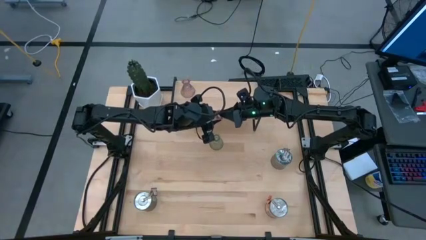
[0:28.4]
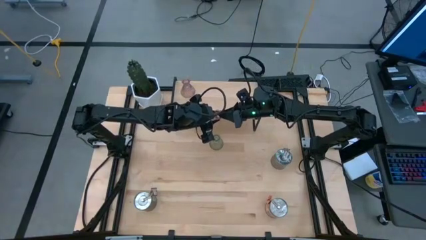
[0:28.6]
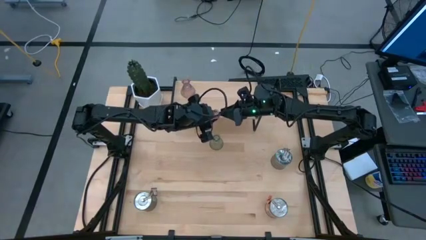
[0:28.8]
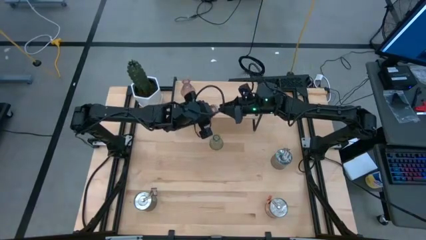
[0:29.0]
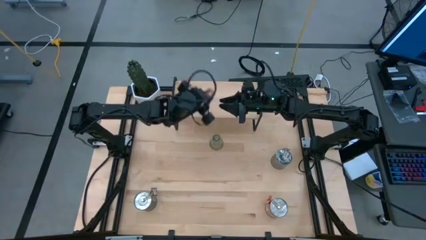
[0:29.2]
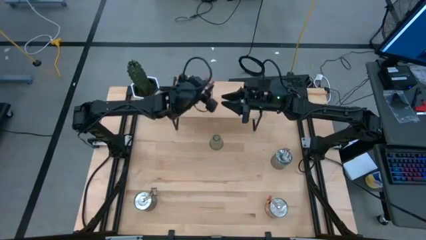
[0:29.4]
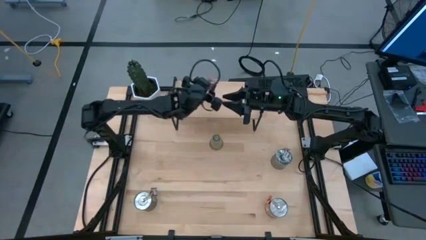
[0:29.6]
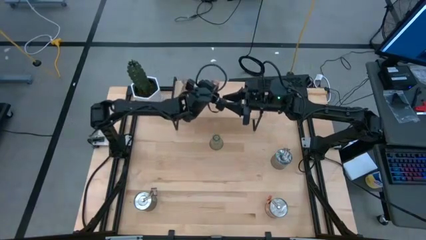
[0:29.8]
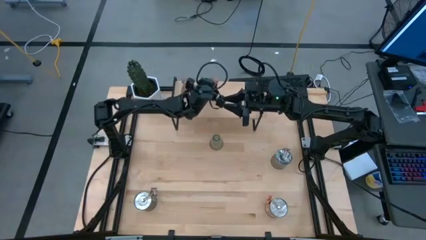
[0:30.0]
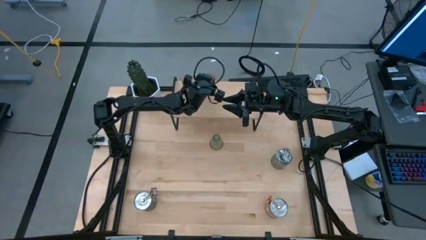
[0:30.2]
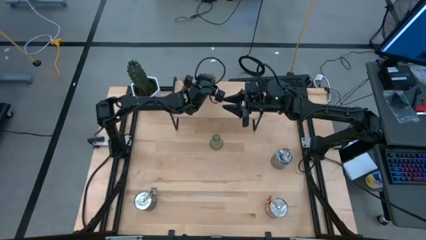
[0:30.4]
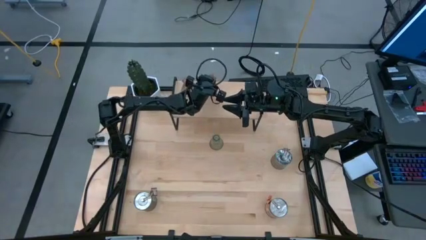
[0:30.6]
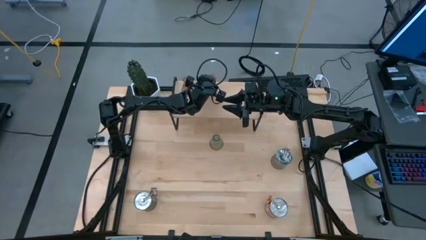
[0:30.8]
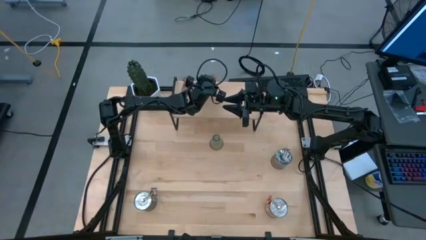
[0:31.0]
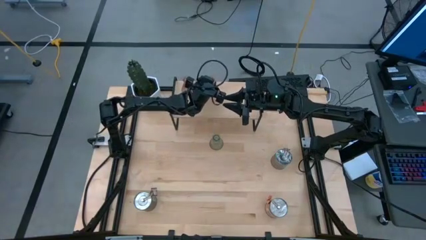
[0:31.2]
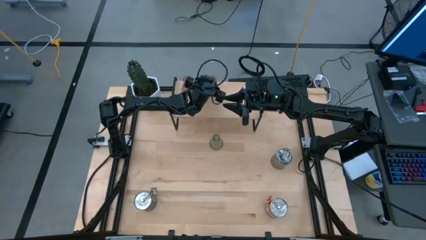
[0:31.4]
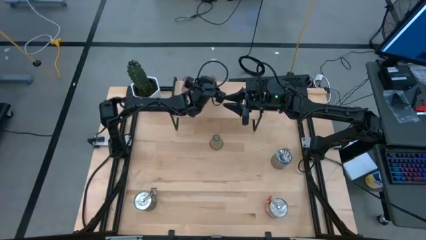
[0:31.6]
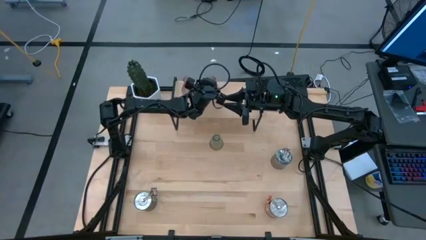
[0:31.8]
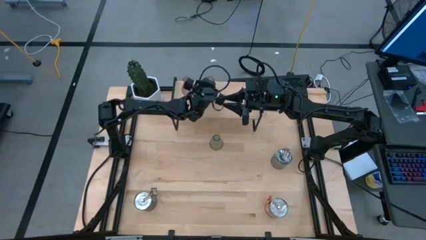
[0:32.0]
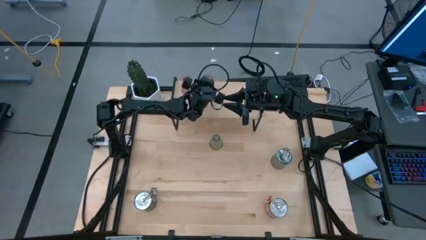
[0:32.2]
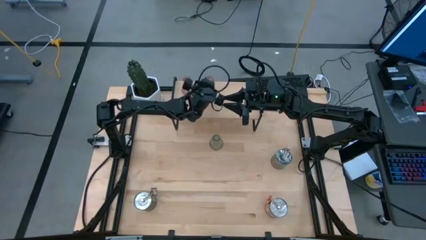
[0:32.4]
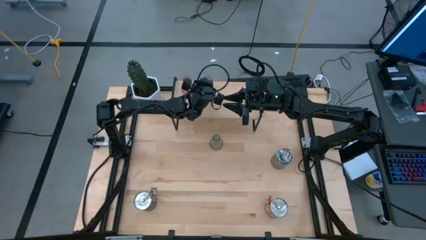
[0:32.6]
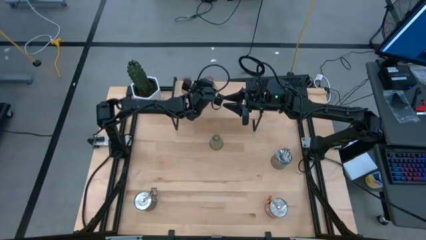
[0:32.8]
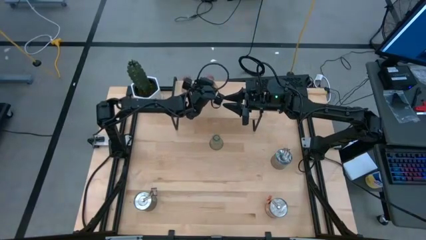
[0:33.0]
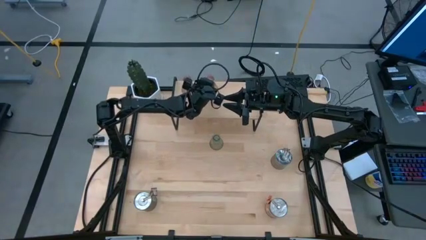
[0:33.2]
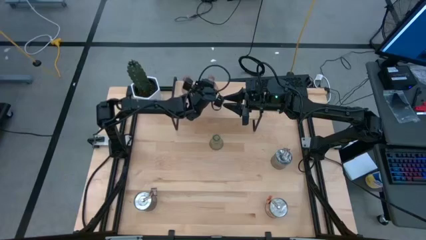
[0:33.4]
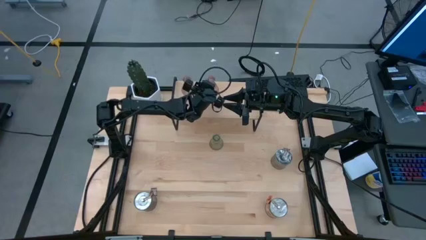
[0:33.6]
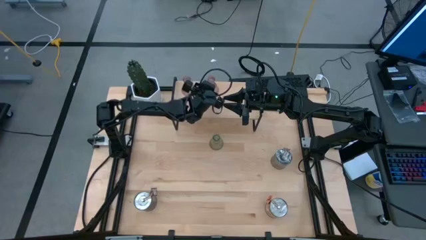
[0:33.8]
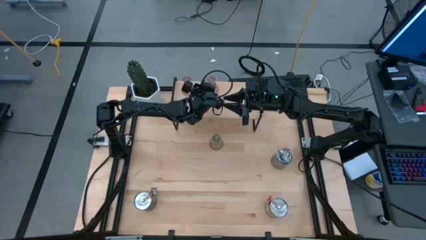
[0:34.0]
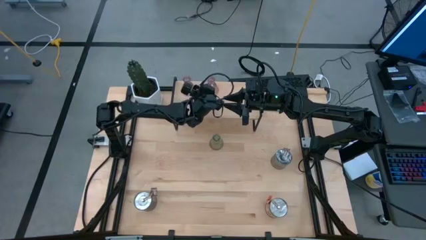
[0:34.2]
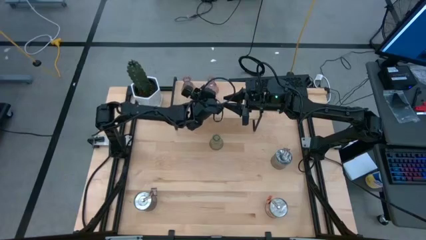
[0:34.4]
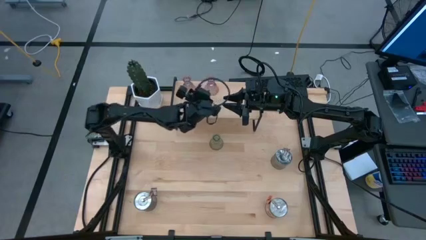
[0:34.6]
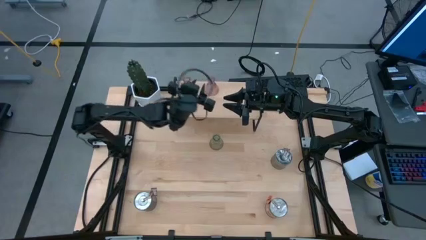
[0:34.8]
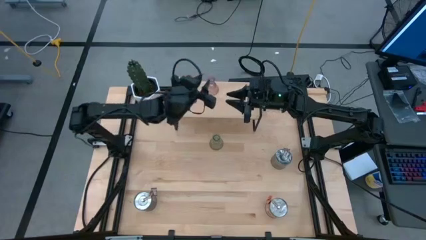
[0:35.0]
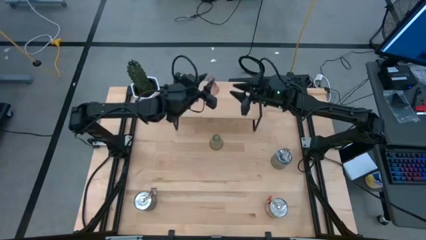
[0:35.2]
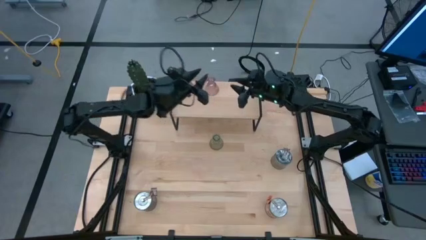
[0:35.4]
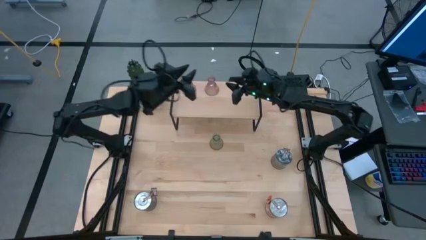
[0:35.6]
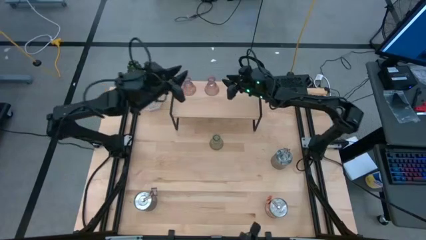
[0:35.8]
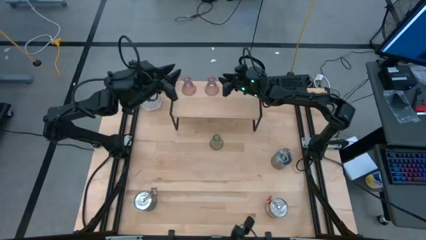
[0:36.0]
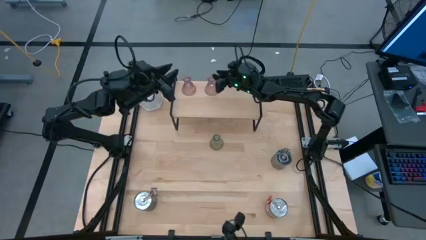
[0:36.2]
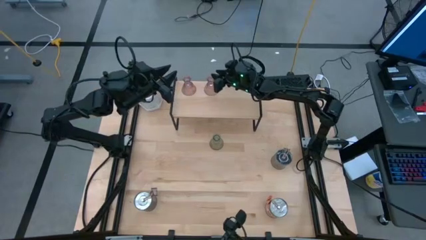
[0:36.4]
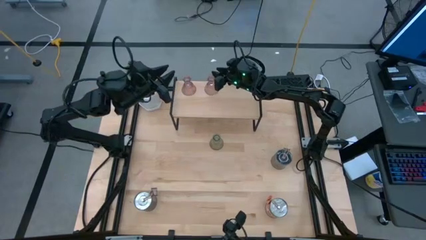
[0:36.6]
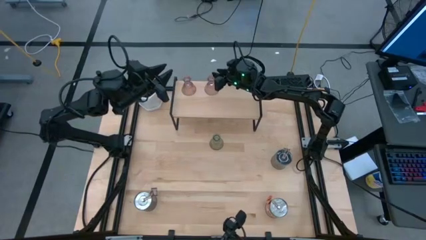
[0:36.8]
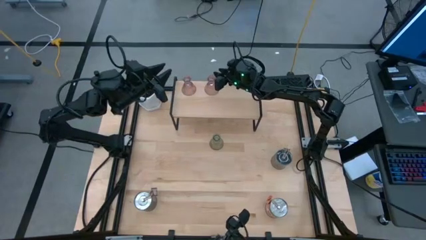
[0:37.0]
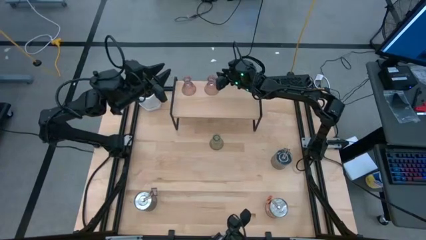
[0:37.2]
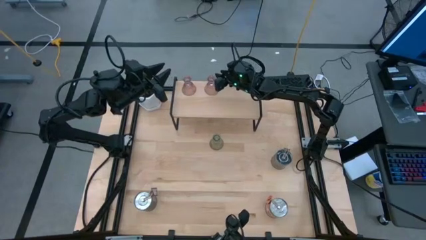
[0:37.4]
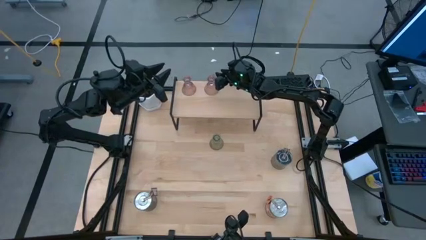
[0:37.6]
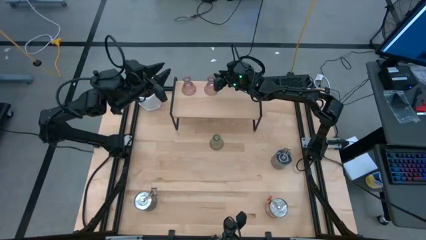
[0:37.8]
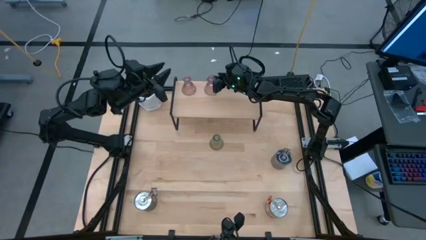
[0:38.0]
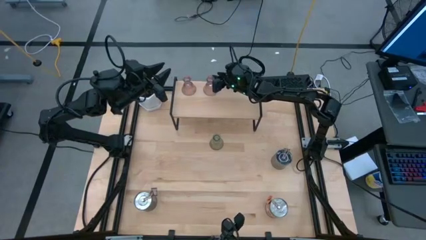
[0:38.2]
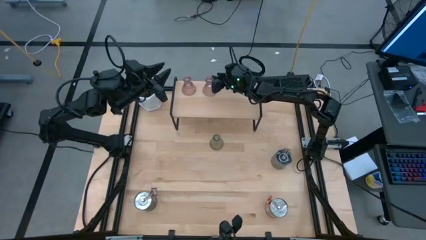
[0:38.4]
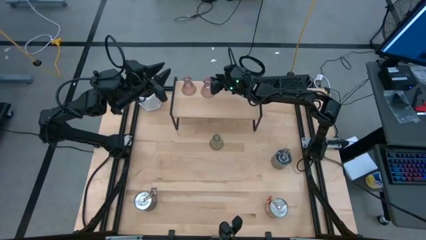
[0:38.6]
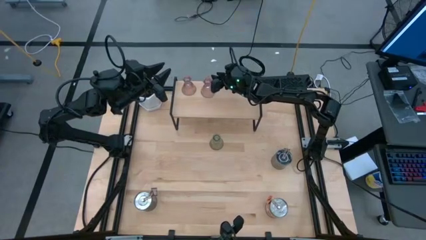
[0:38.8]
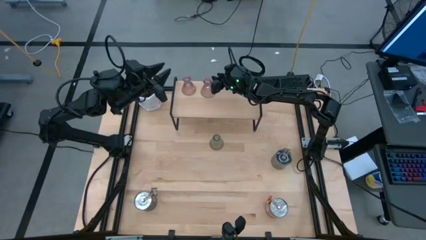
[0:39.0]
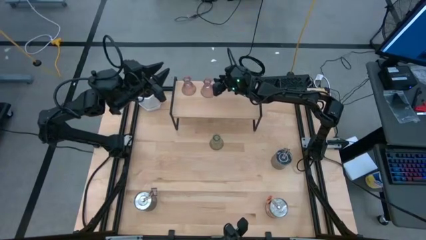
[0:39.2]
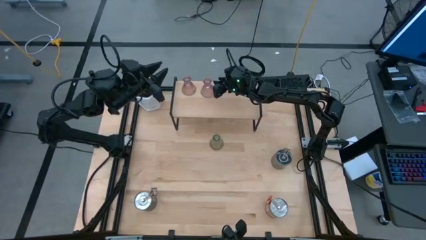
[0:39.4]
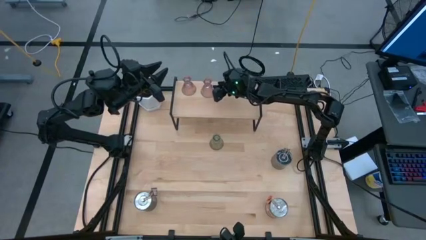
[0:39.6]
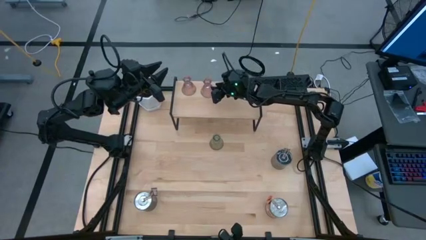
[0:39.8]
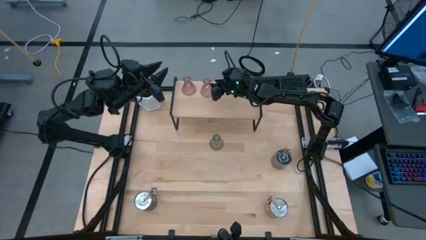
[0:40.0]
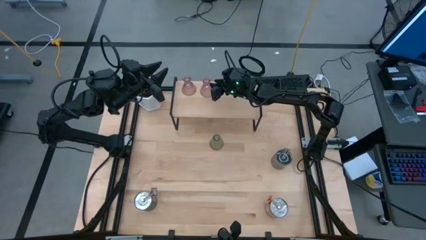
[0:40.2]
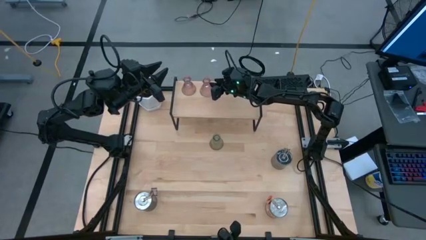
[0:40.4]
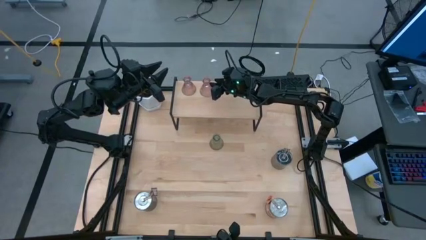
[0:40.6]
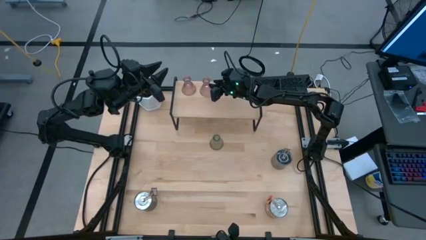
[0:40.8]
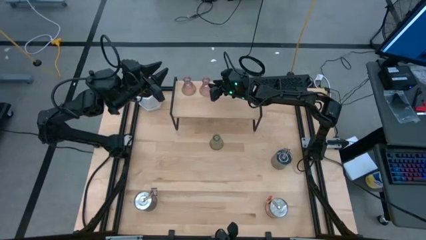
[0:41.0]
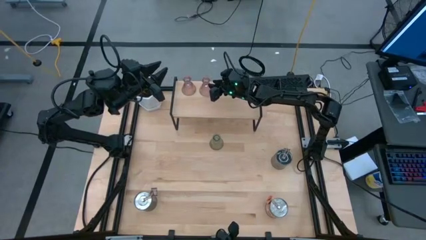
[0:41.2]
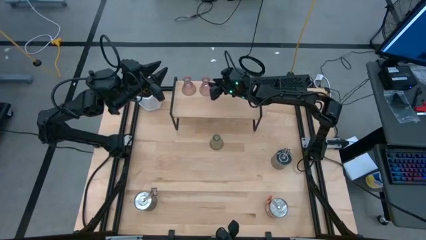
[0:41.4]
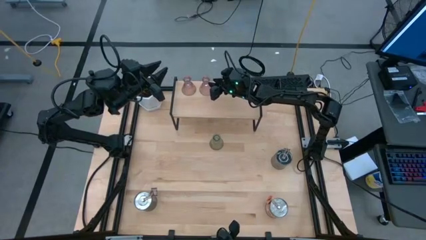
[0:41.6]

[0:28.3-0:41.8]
Task: Pick & Place candle stick holders
Put the pink candle holder on the shelf
